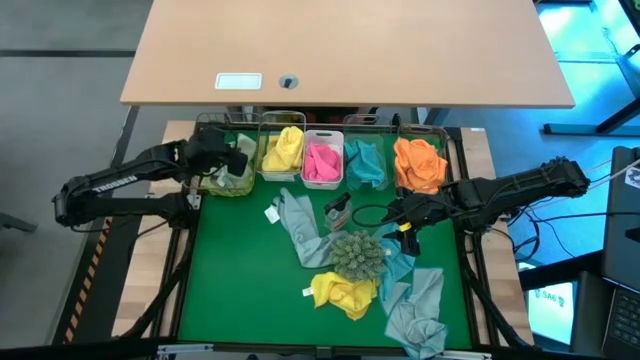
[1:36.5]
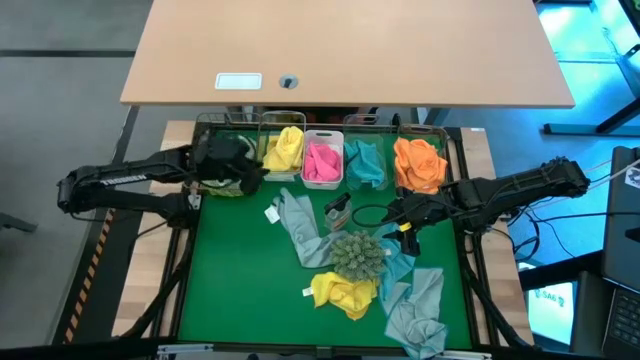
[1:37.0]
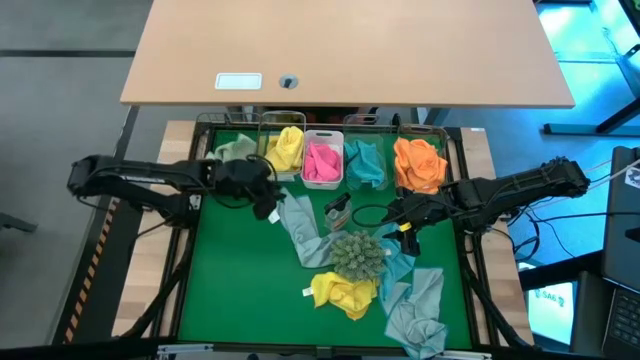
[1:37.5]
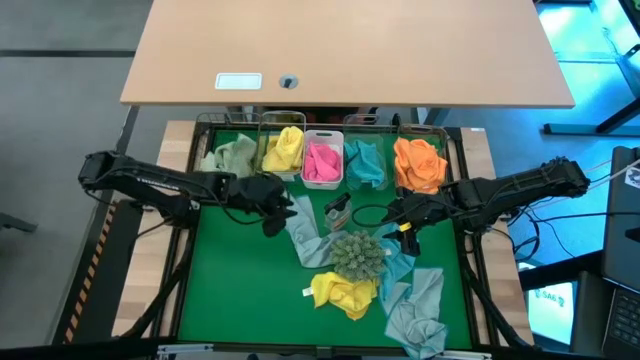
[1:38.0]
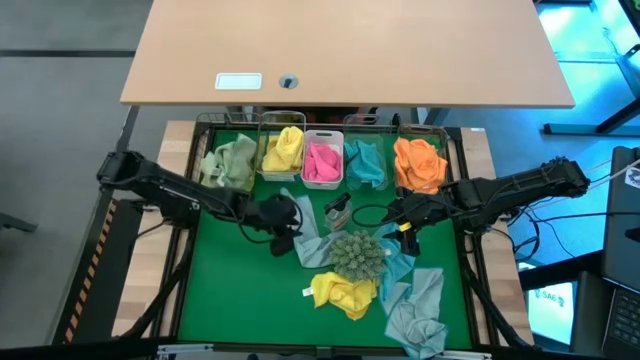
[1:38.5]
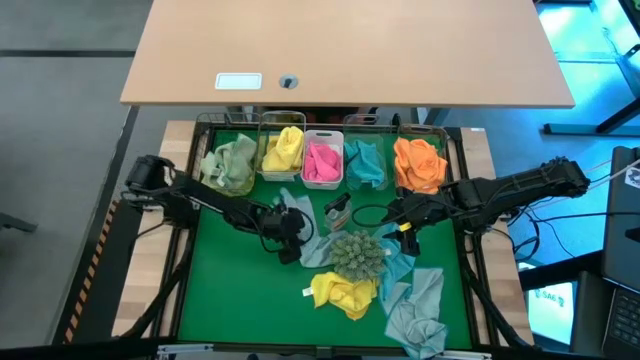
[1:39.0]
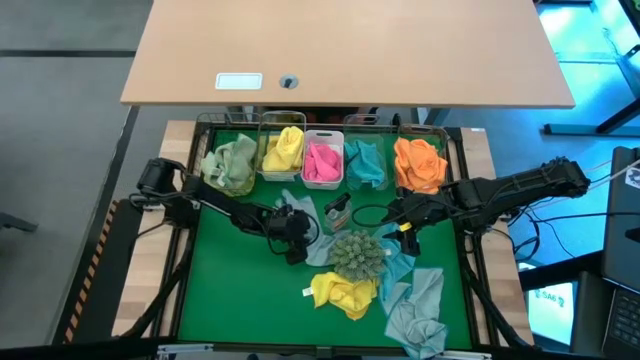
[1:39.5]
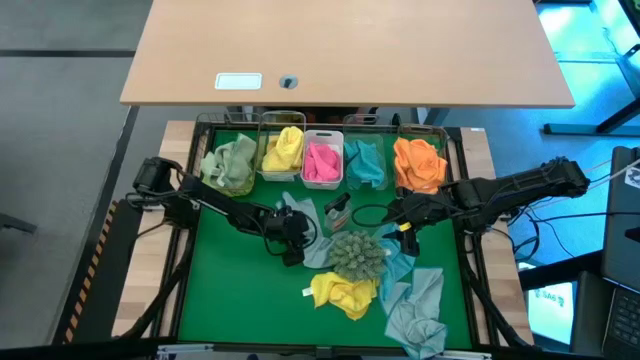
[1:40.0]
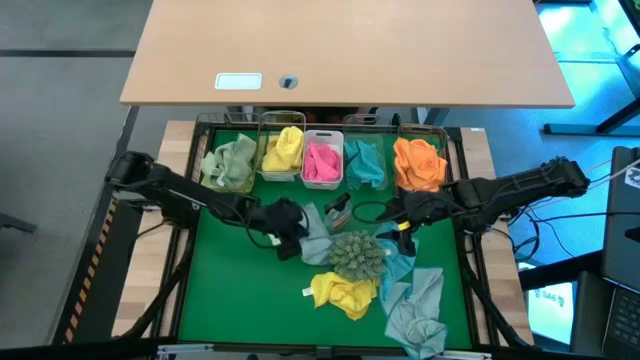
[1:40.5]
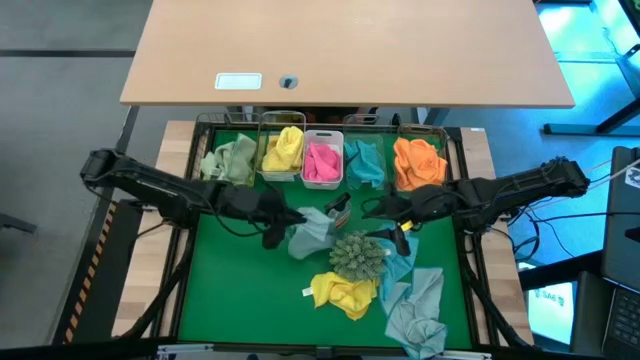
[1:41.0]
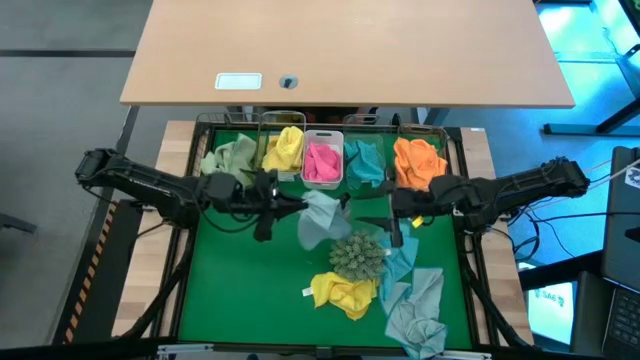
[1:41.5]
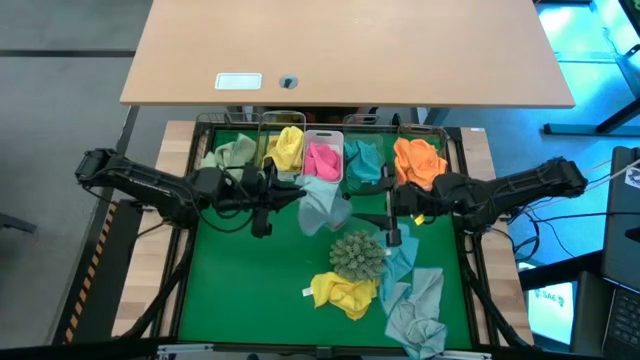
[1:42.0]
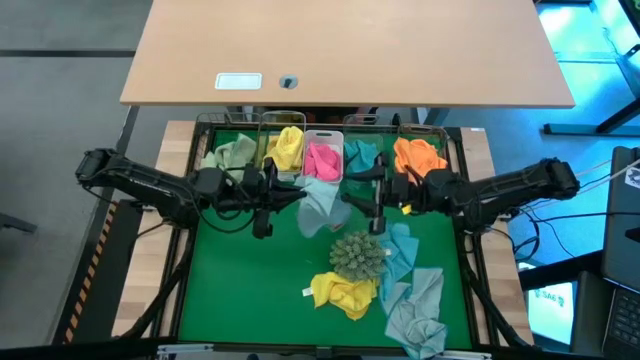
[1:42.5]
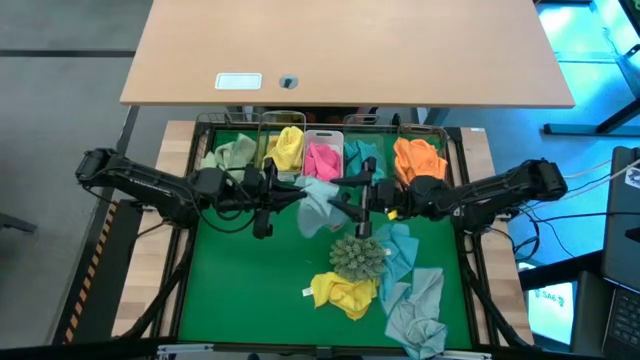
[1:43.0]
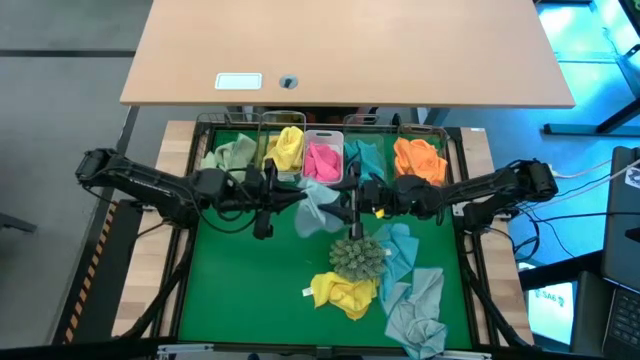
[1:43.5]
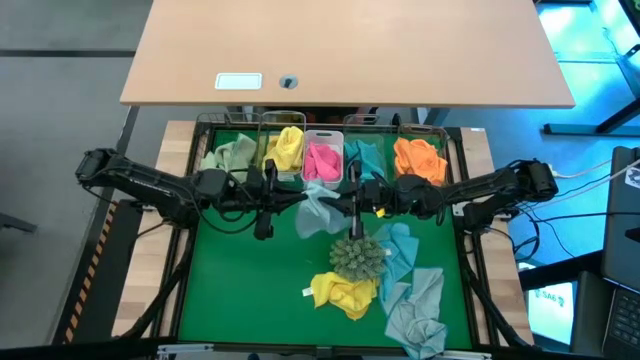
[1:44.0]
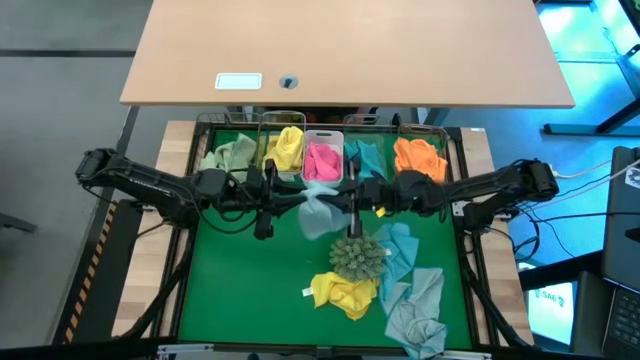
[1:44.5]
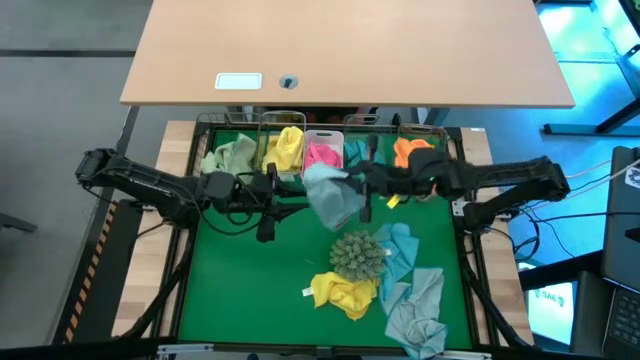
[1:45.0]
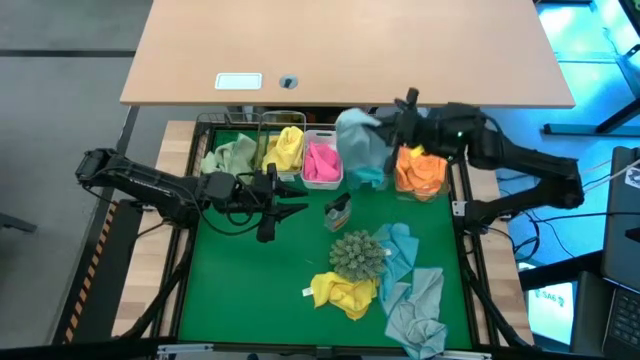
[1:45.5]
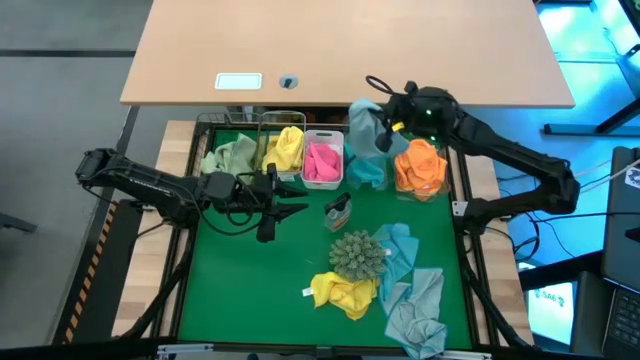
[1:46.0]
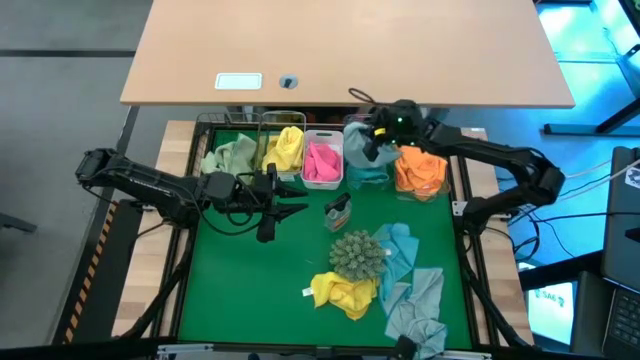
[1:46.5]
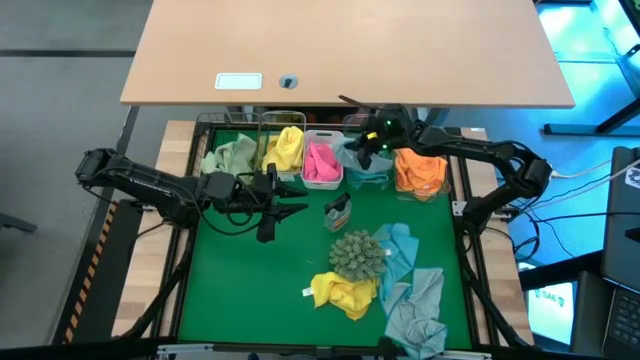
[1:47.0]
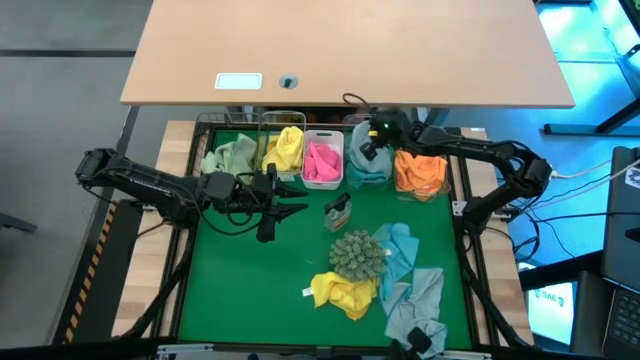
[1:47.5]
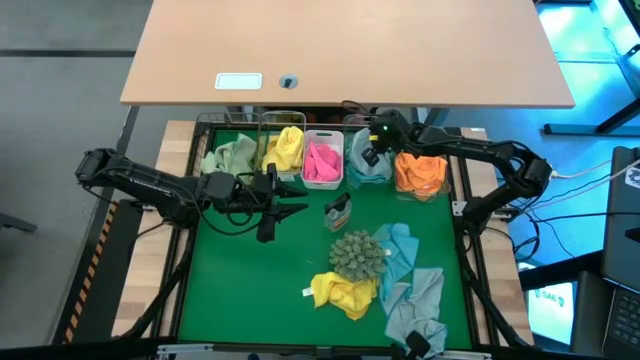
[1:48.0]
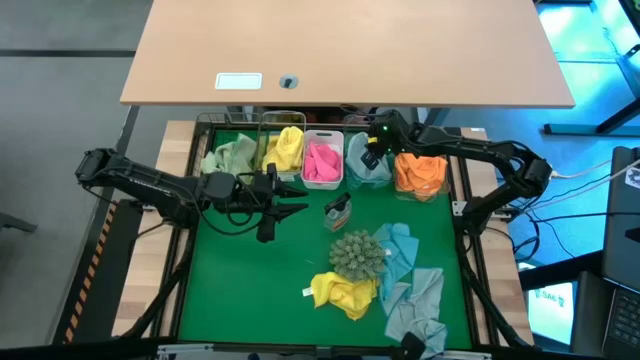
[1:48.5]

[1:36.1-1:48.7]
Task: Sort microfiber towel by color & place in baskets
Put the left light blue microfiber towel into the middle transparent bin

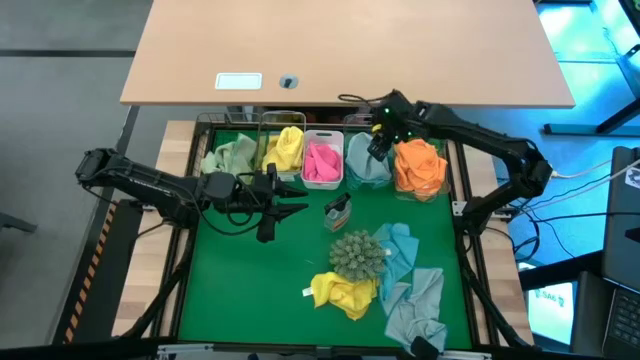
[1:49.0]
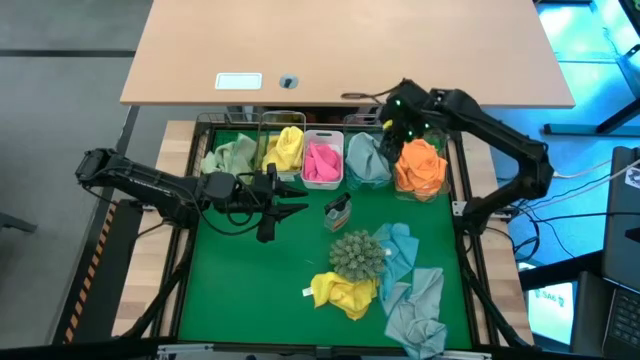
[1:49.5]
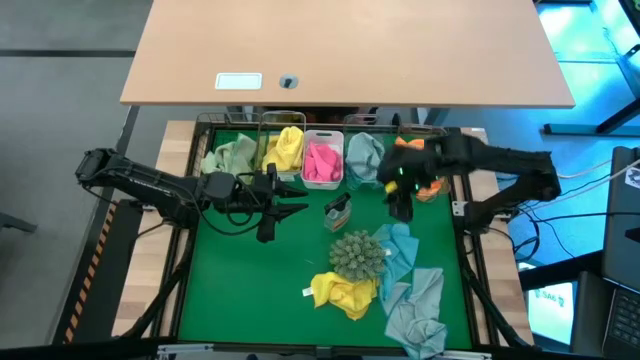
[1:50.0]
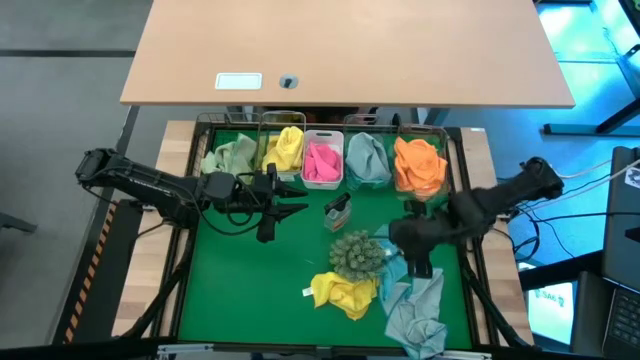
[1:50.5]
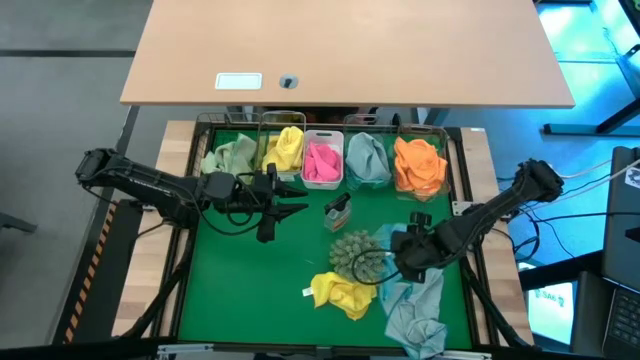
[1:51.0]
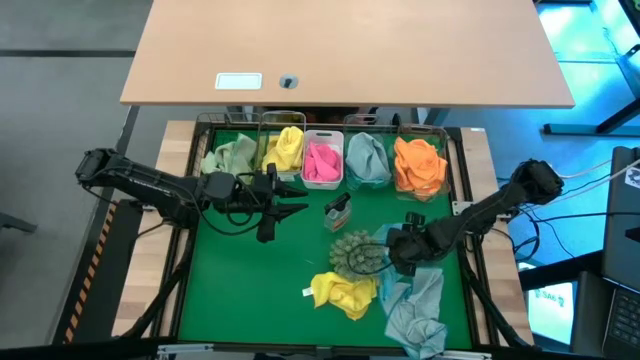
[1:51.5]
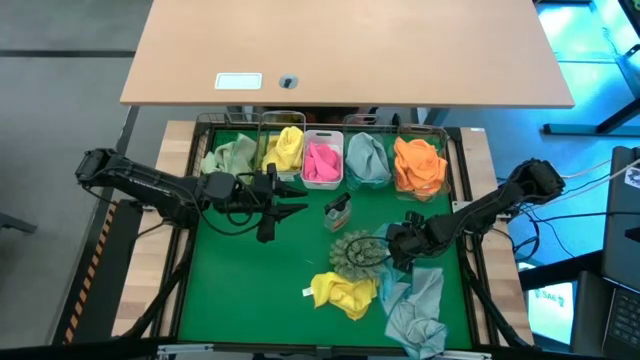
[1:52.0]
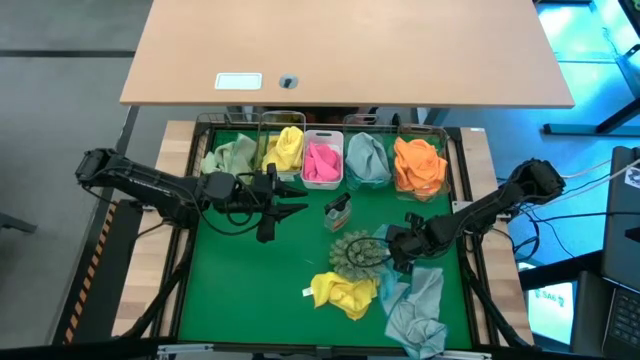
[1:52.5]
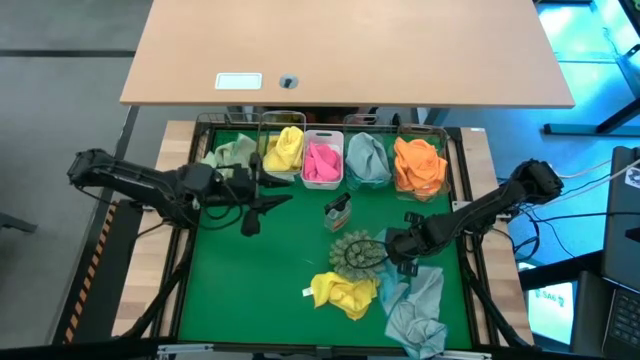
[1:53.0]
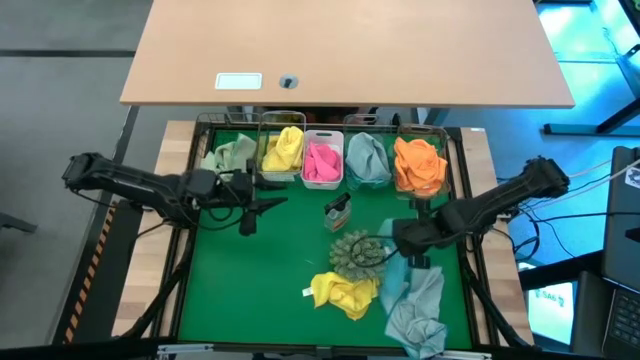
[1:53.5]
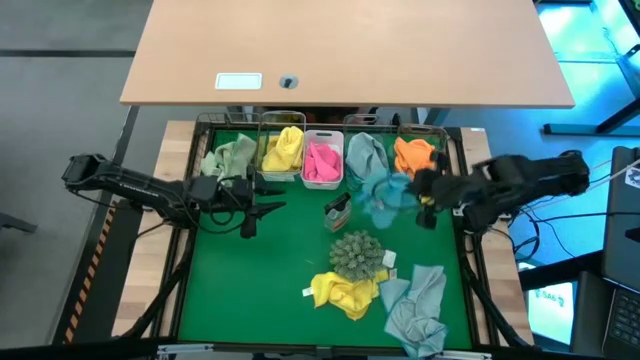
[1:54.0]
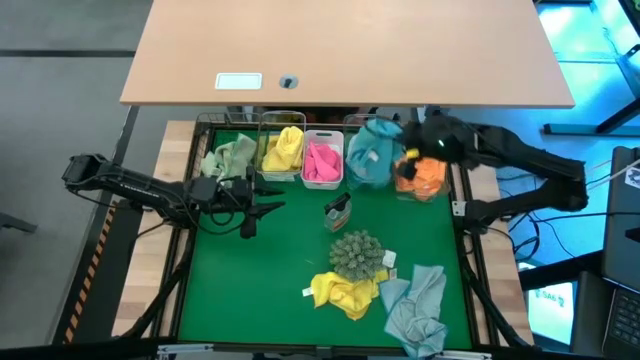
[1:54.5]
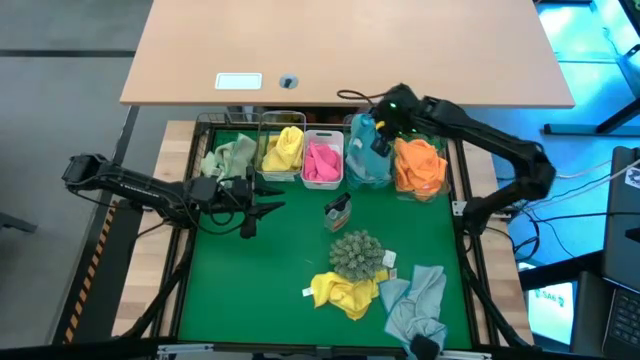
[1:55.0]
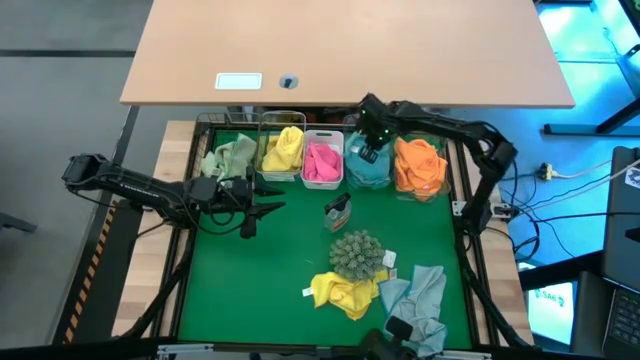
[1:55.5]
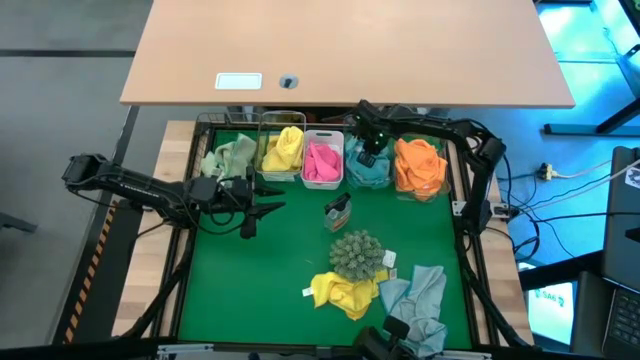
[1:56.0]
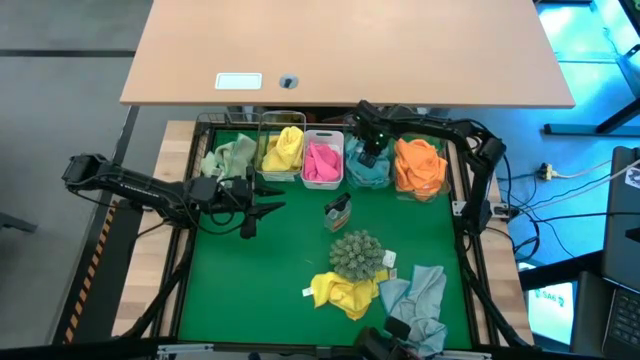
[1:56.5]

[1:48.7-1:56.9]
Put the blue microfiber towel into the middle transparent bin
